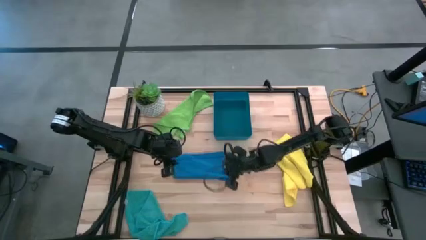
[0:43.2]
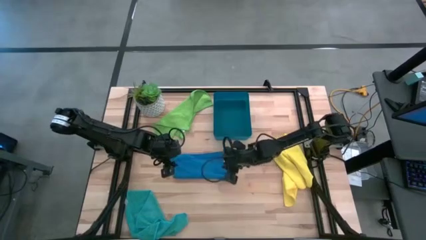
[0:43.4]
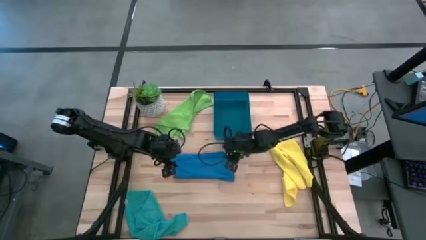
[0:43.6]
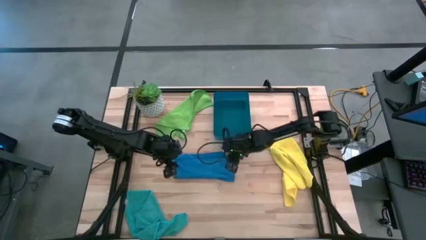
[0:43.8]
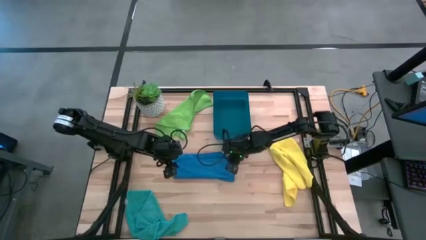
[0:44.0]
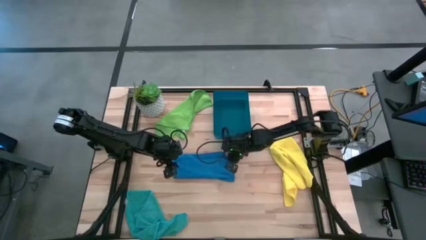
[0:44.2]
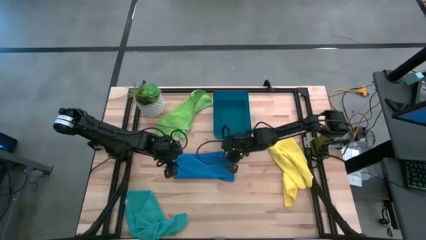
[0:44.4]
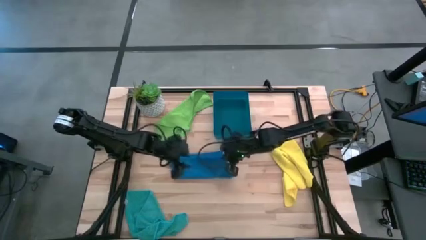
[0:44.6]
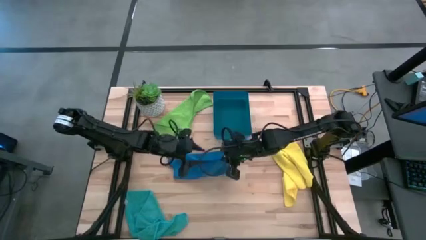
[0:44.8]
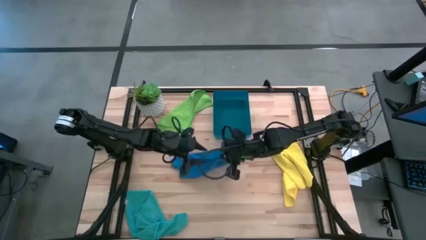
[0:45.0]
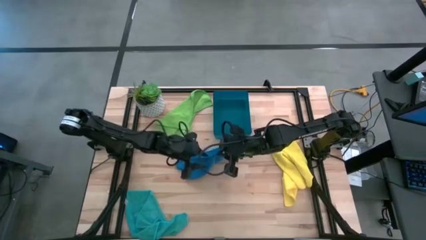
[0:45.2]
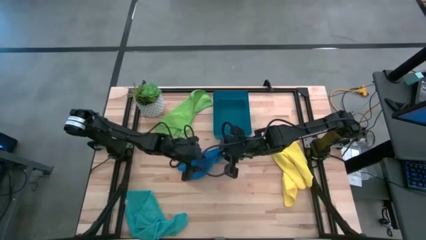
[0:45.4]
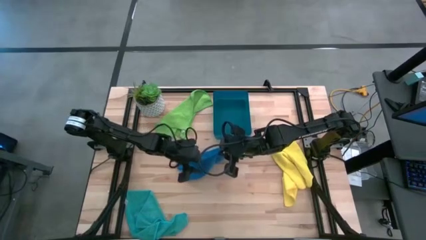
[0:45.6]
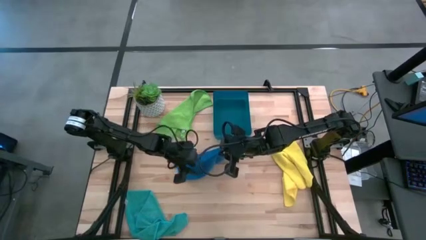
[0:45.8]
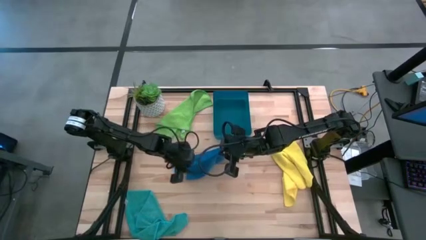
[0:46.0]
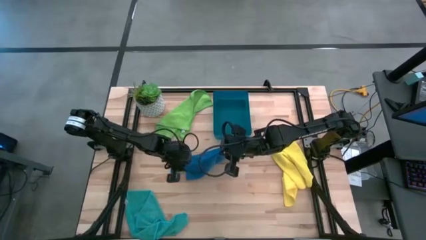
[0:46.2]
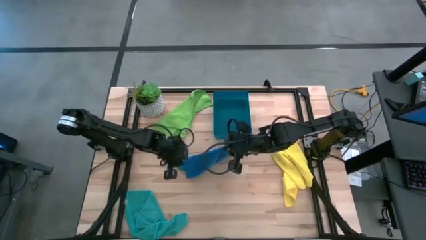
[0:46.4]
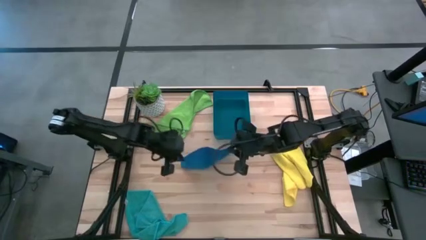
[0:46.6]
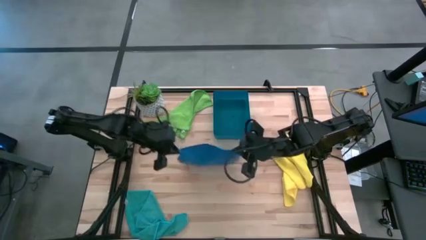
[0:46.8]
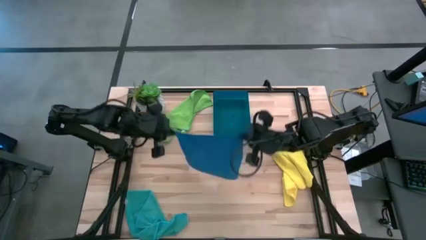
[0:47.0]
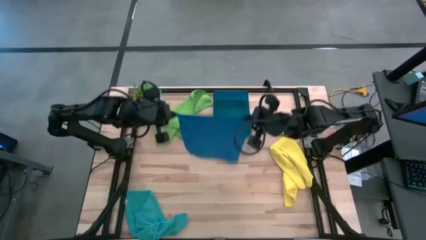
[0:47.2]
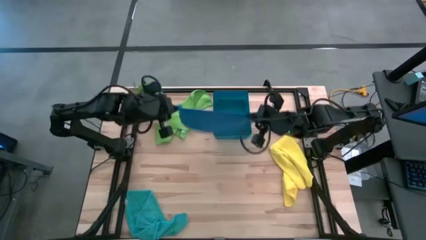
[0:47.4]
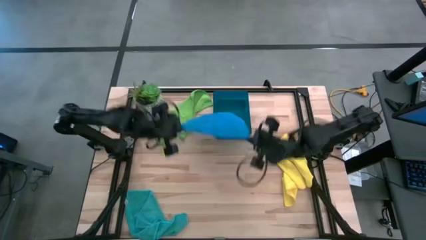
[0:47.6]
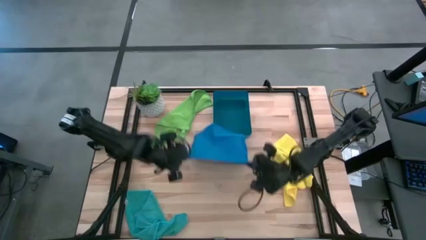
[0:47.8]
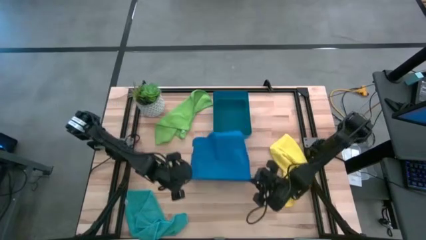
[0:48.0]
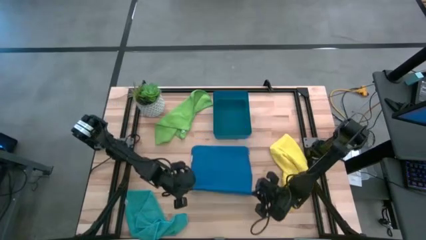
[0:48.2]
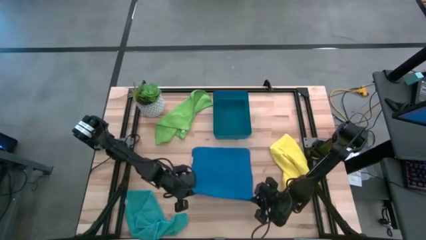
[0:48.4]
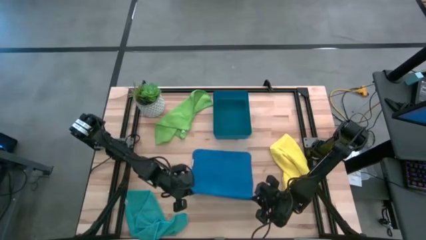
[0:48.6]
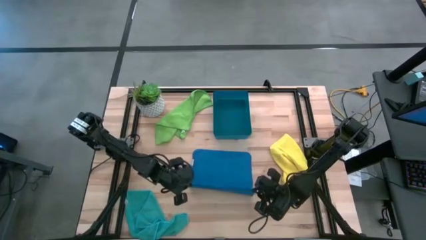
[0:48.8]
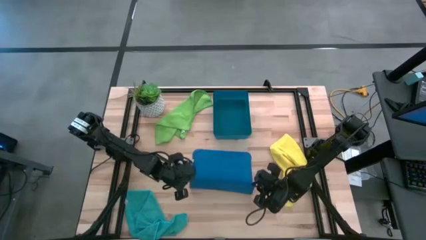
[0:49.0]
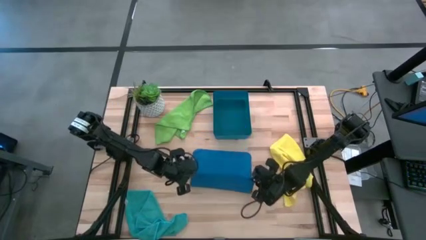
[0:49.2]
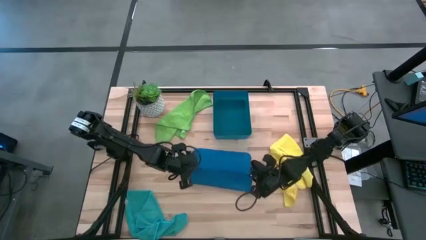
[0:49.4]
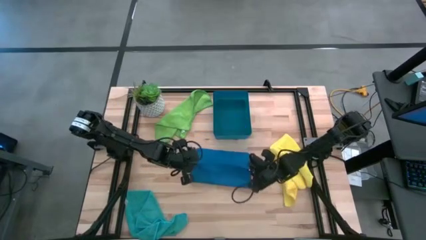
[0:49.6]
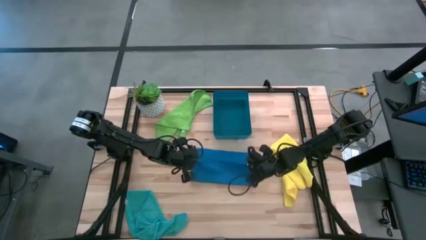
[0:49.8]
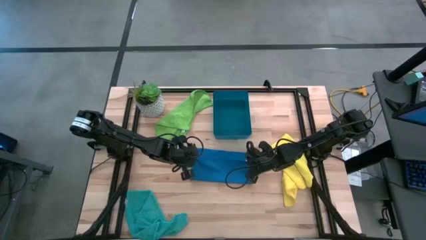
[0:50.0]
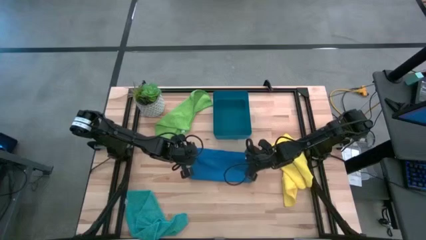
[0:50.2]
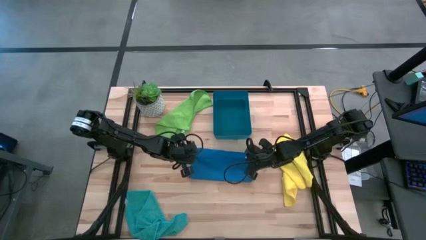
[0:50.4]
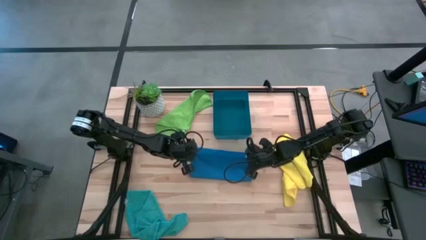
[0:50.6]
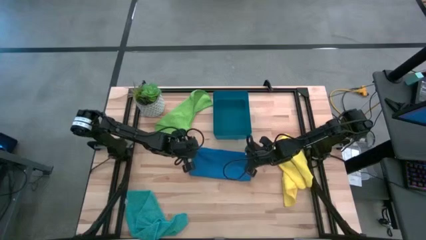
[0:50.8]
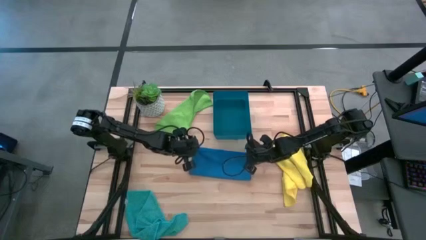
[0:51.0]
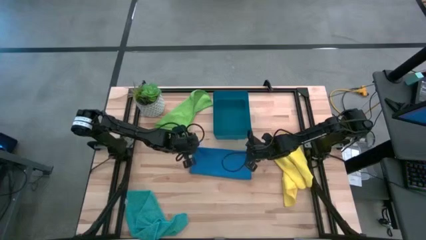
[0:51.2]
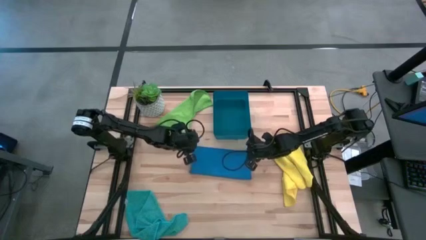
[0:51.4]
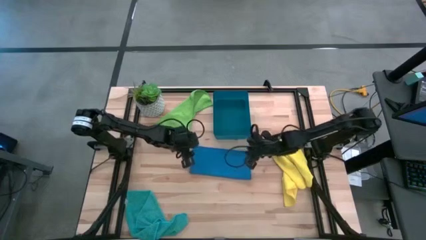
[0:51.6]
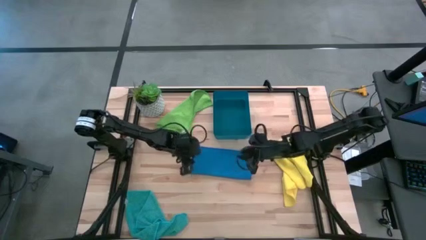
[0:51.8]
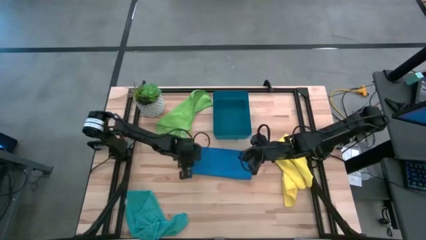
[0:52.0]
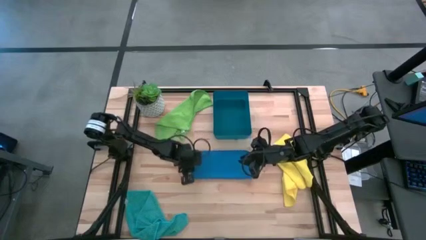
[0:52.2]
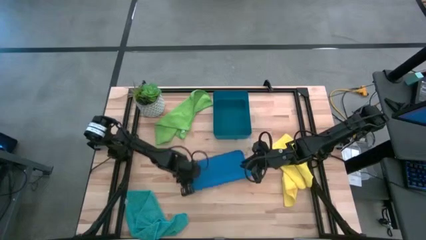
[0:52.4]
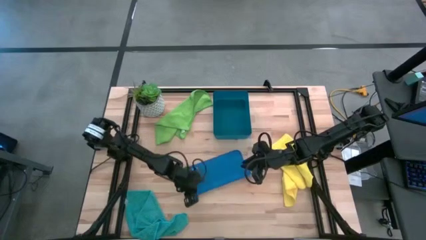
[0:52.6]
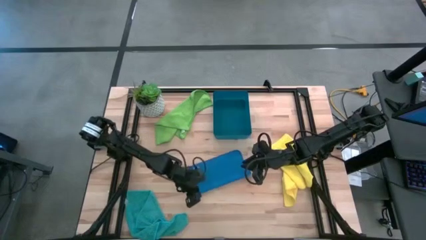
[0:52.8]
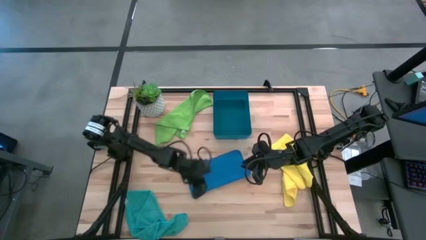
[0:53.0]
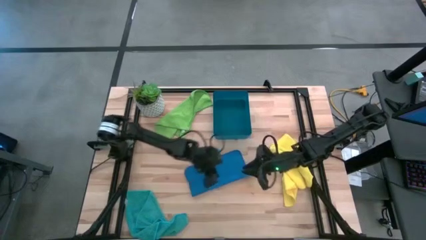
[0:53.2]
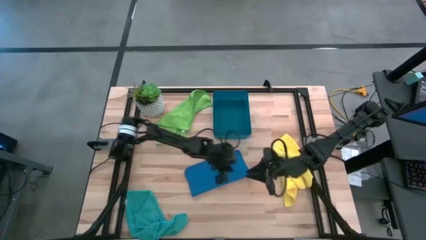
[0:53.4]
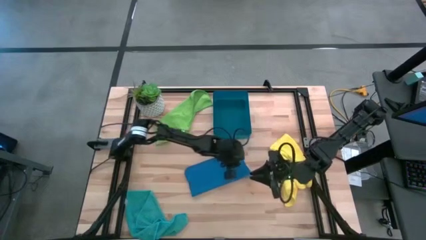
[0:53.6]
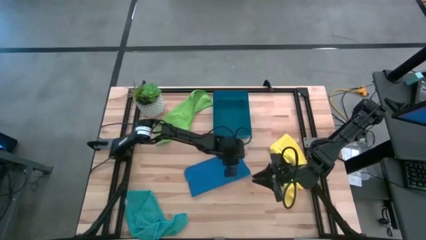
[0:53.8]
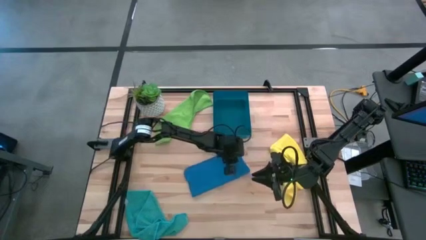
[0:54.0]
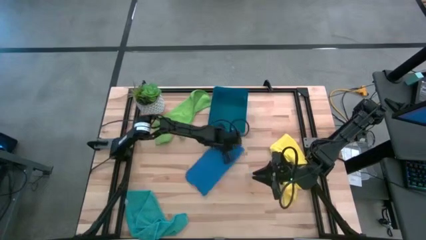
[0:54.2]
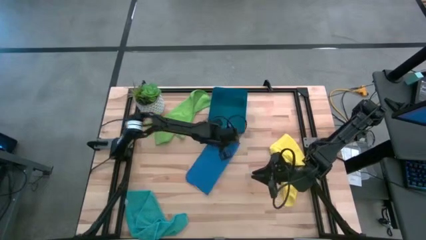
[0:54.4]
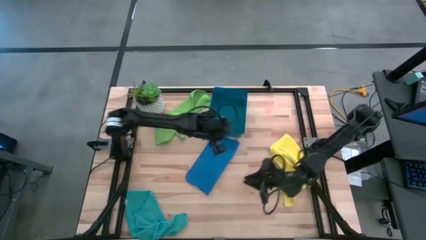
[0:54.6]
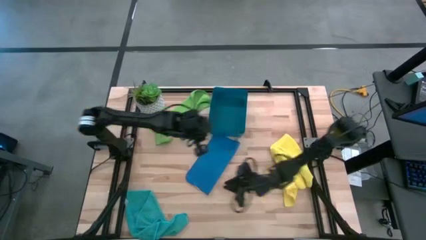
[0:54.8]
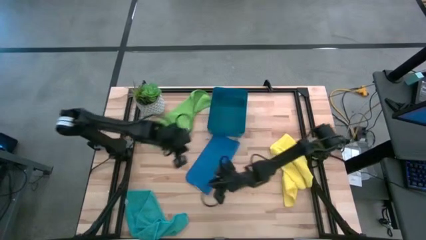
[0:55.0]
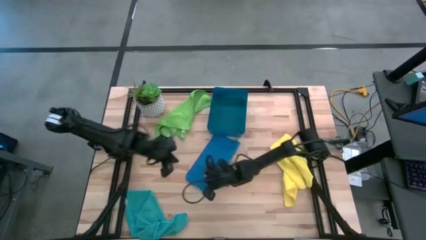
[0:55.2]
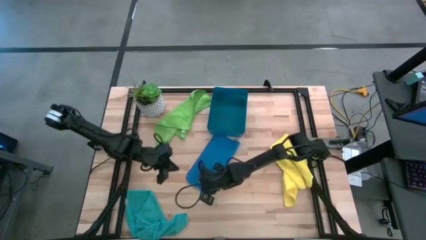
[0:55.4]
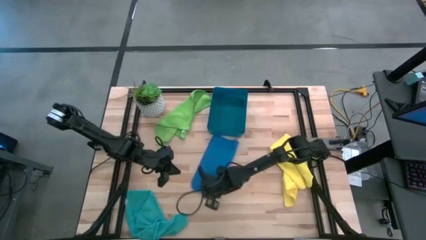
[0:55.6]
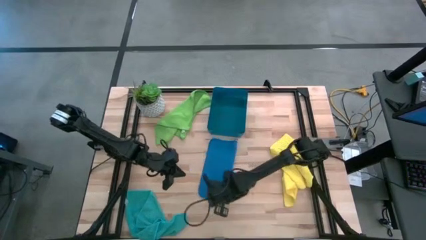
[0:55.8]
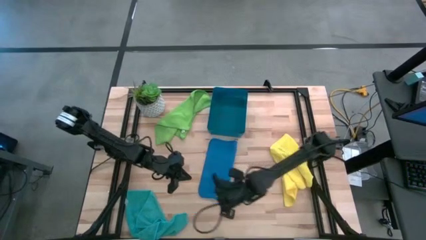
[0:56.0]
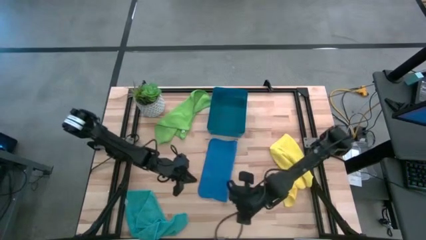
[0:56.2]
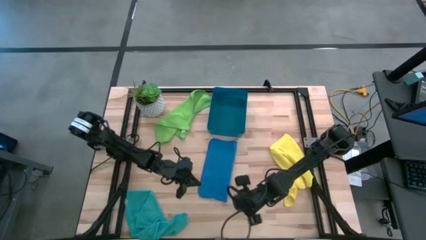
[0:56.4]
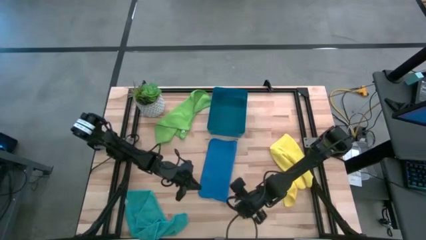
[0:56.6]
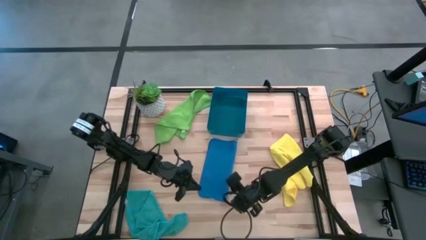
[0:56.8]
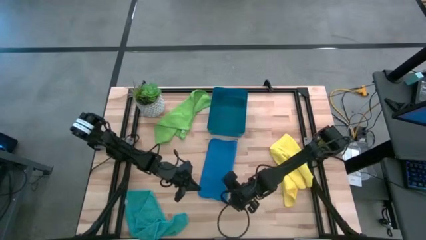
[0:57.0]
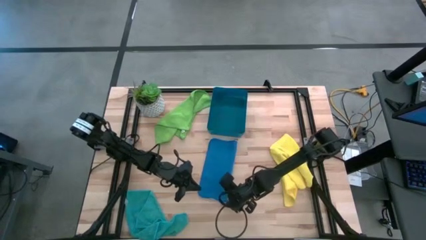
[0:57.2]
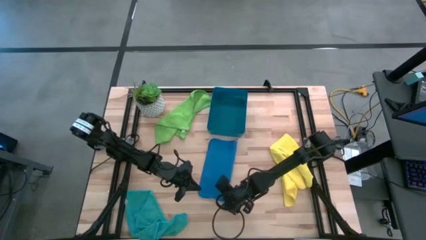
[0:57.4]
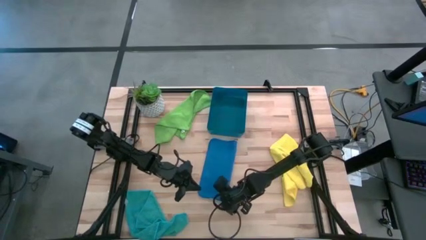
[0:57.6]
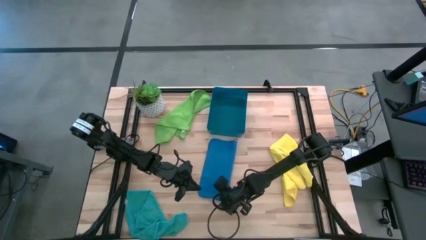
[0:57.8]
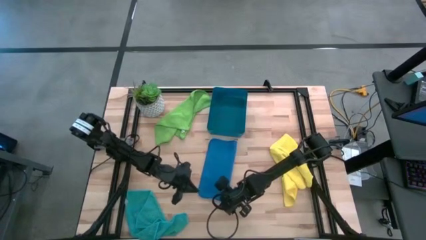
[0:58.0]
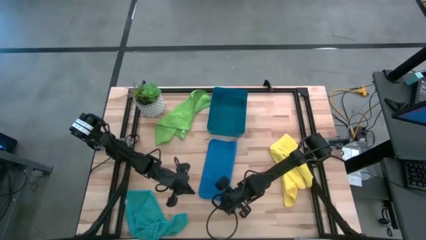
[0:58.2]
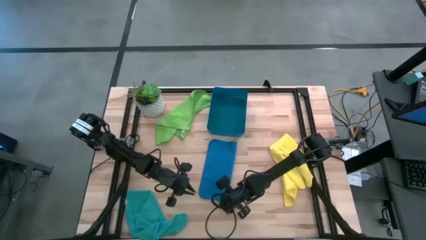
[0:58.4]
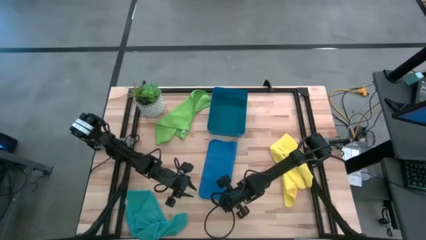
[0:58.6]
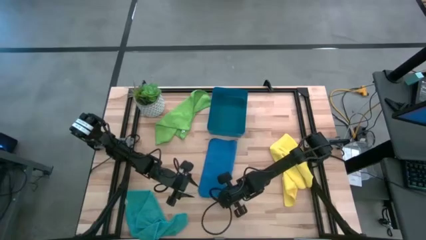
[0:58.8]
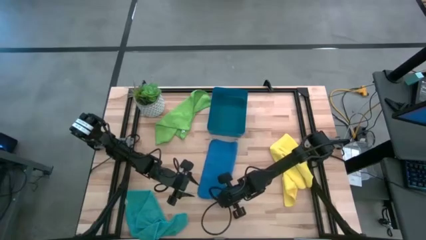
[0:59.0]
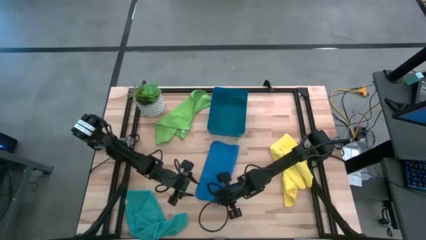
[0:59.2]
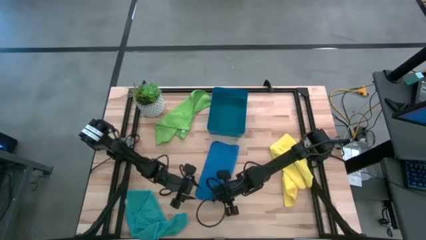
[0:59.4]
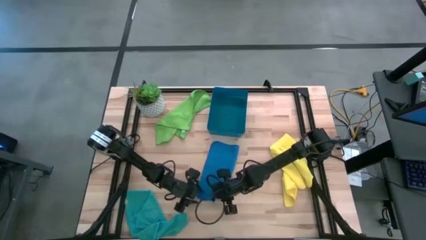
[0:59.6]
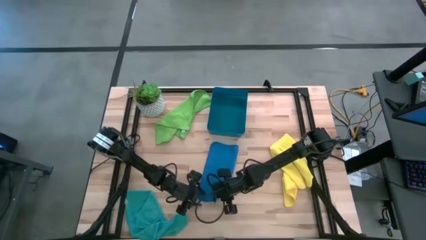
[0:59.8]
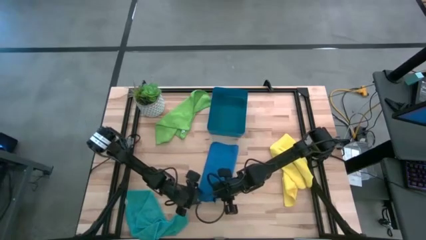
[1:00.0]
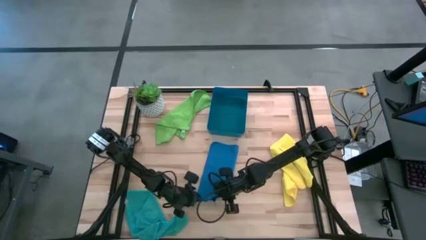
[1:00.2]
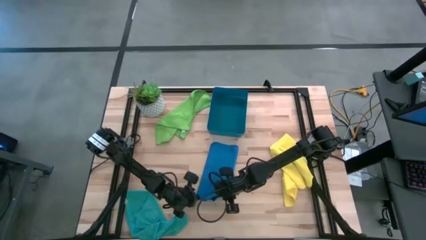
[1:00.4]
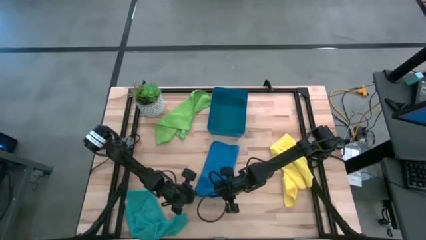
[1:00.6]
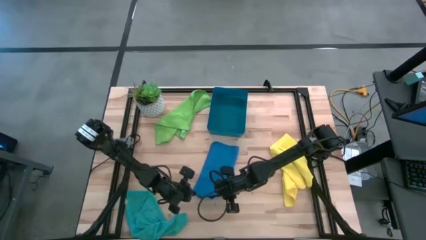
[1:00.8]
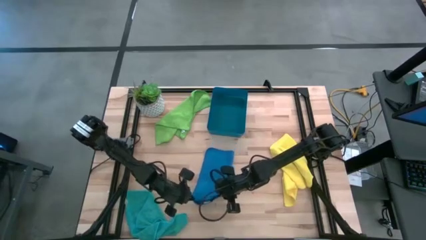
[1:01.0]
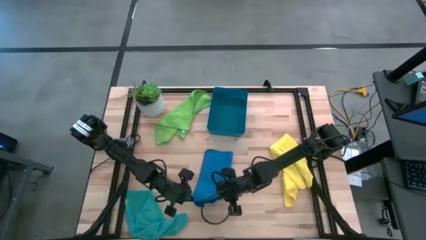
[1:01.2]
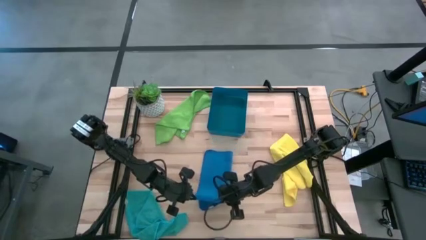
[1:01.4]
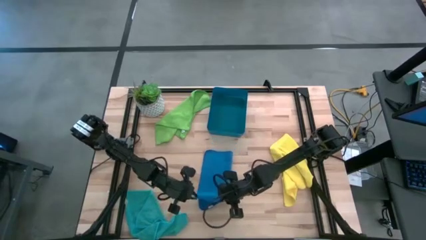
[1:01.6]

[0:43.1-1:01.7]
Task: Fold microfiber towels
Fold the blue microfiber cloth
